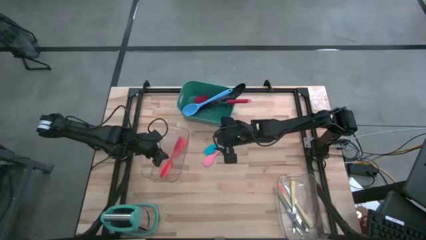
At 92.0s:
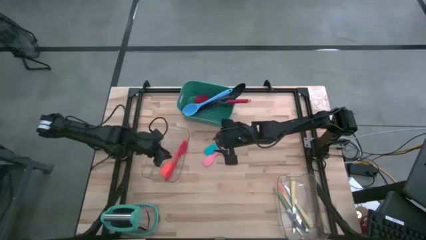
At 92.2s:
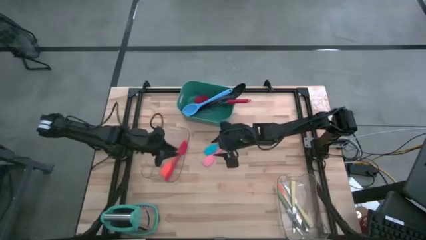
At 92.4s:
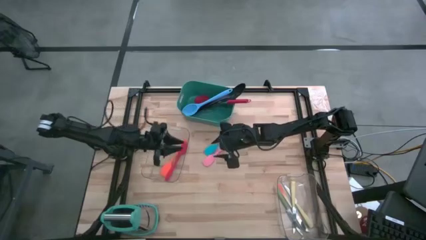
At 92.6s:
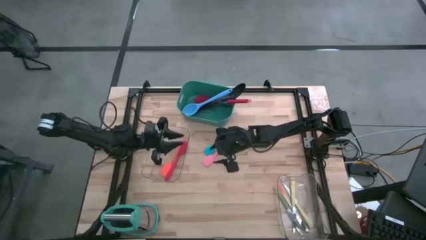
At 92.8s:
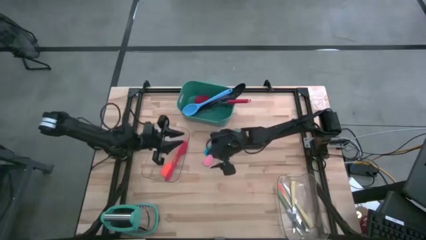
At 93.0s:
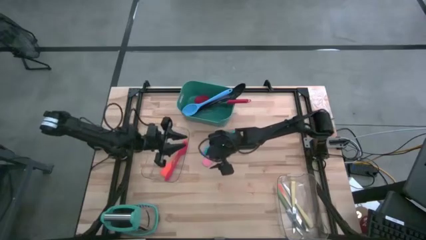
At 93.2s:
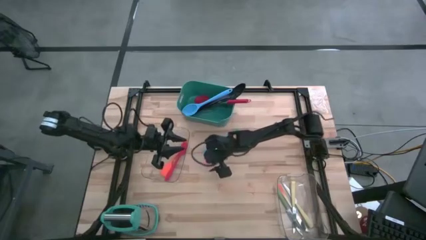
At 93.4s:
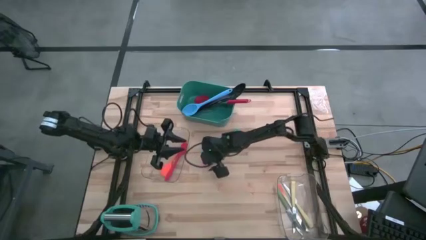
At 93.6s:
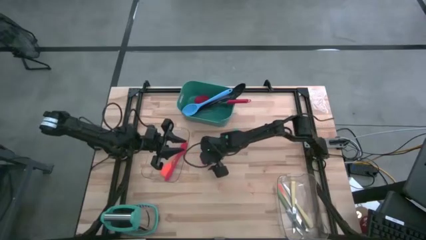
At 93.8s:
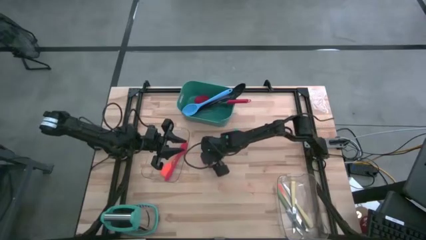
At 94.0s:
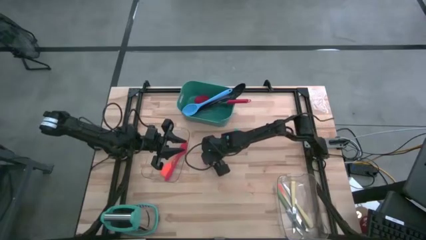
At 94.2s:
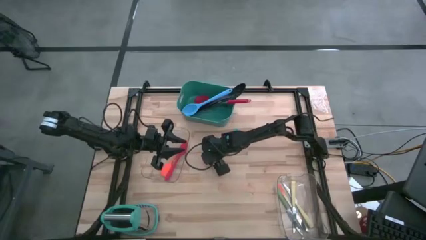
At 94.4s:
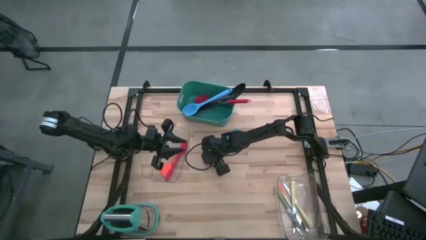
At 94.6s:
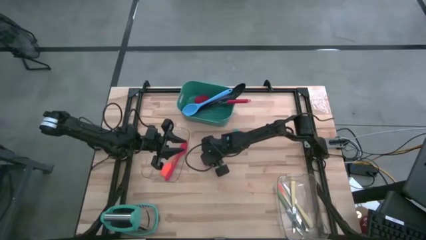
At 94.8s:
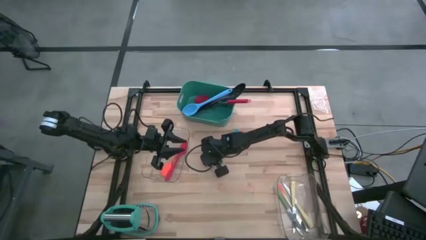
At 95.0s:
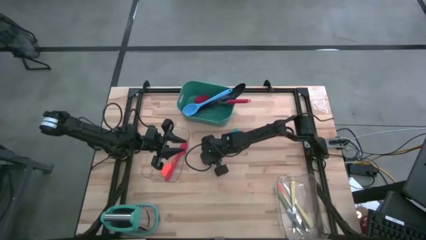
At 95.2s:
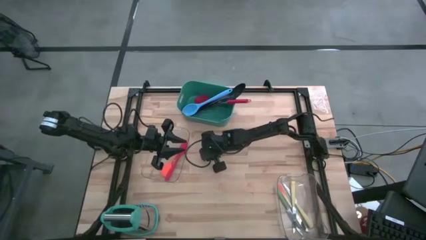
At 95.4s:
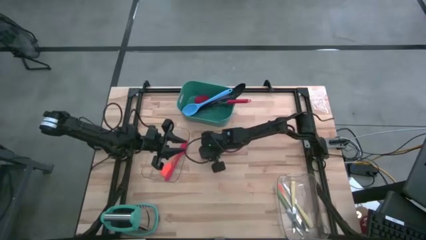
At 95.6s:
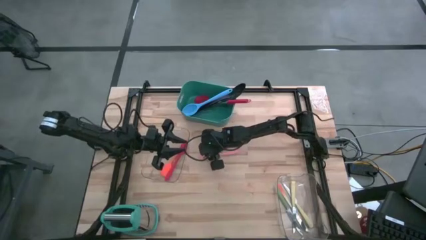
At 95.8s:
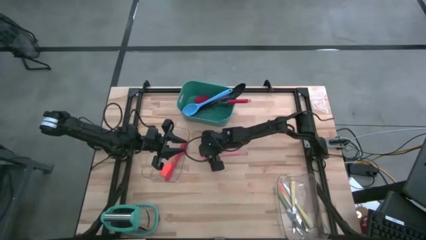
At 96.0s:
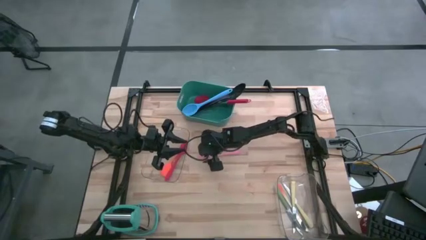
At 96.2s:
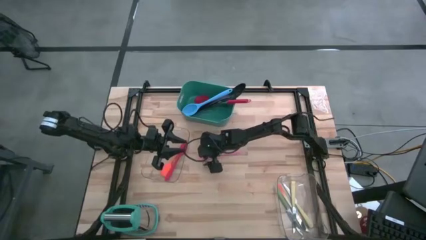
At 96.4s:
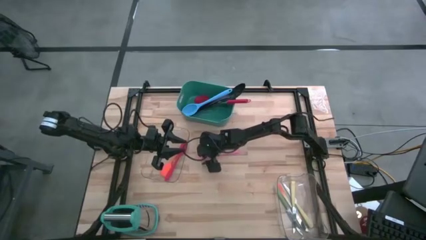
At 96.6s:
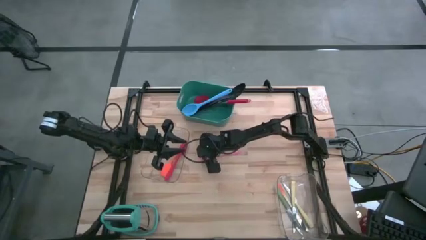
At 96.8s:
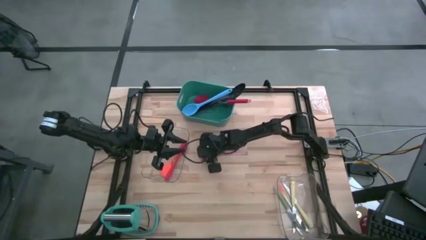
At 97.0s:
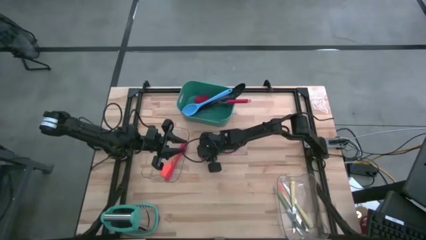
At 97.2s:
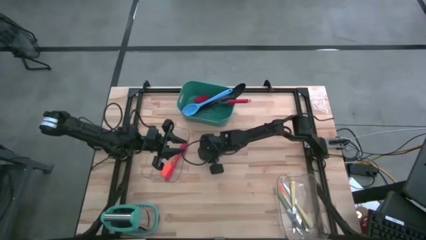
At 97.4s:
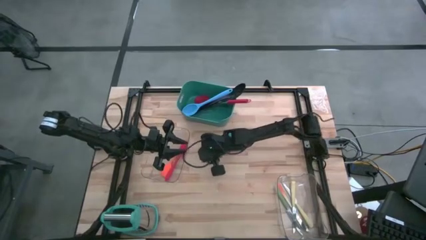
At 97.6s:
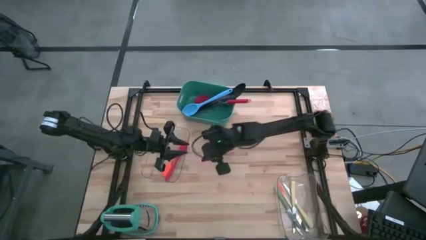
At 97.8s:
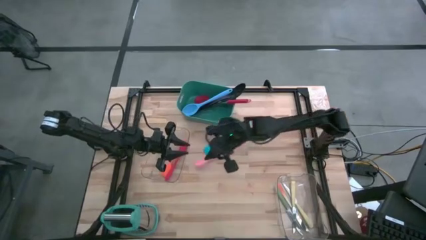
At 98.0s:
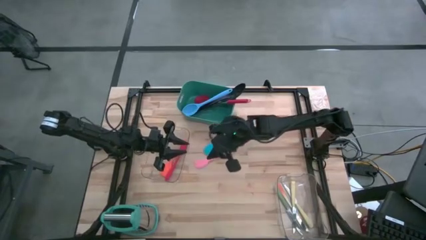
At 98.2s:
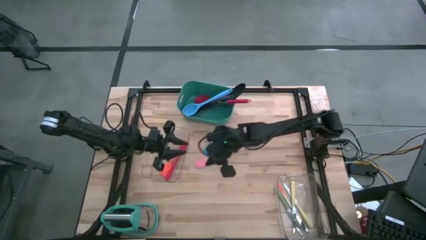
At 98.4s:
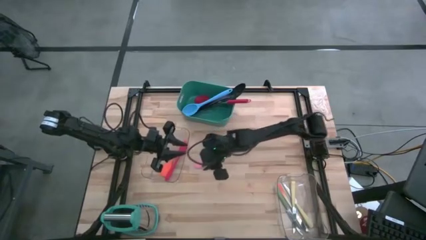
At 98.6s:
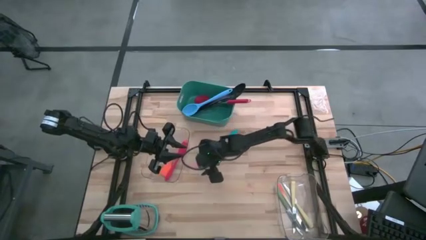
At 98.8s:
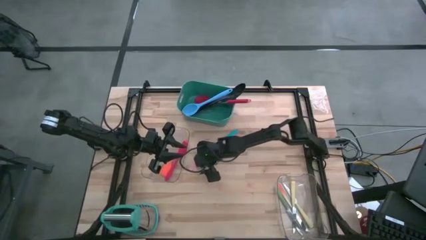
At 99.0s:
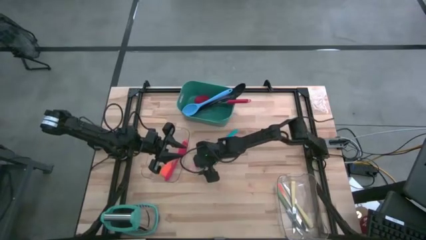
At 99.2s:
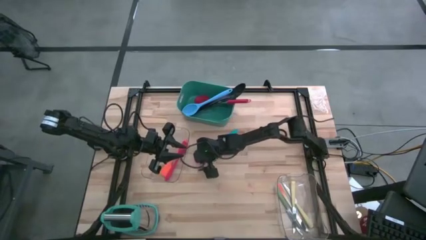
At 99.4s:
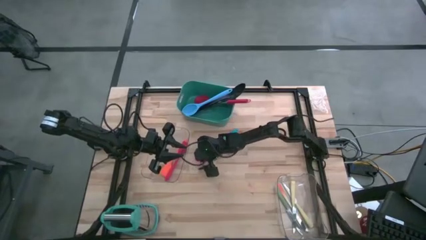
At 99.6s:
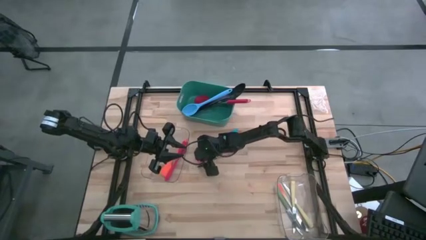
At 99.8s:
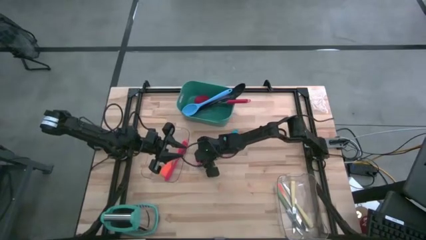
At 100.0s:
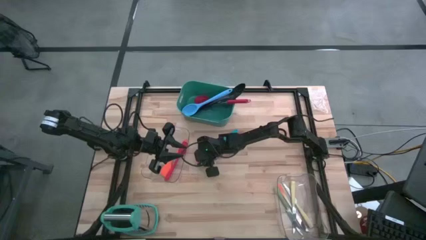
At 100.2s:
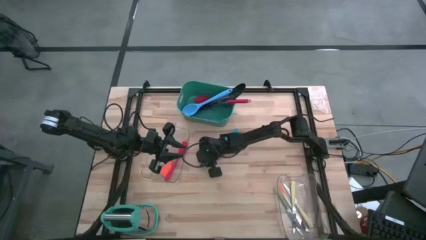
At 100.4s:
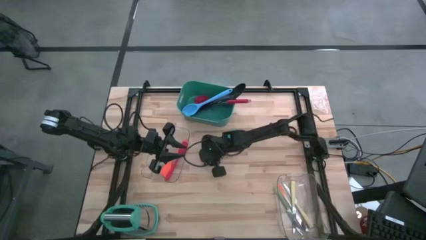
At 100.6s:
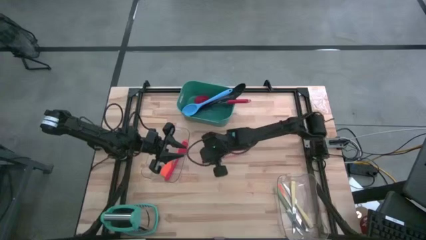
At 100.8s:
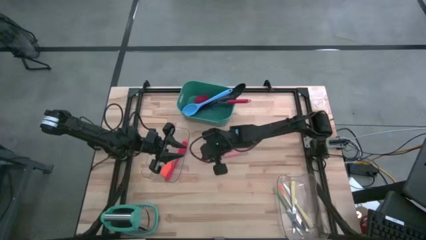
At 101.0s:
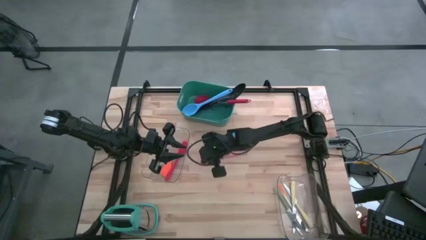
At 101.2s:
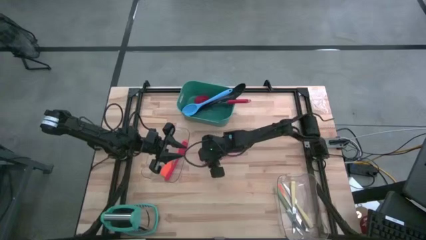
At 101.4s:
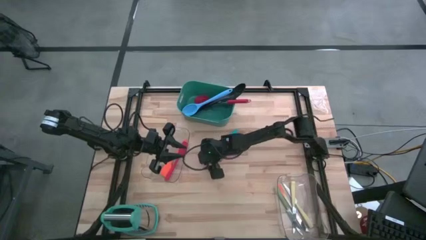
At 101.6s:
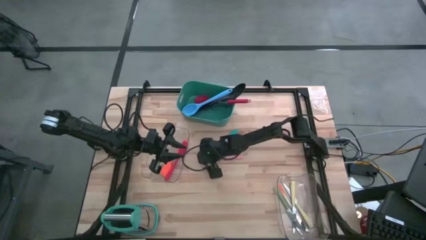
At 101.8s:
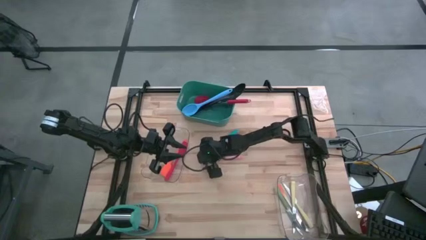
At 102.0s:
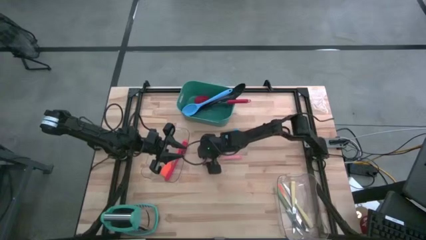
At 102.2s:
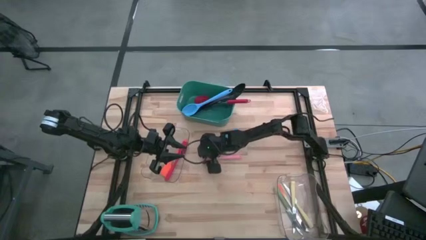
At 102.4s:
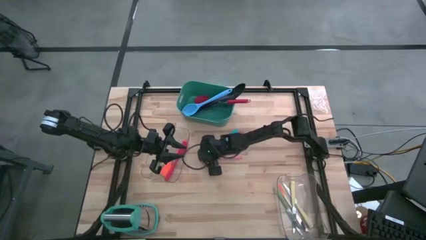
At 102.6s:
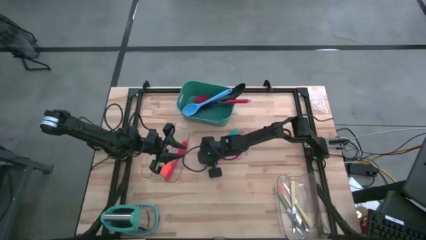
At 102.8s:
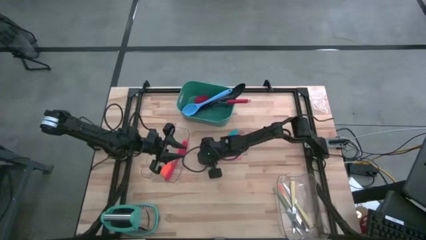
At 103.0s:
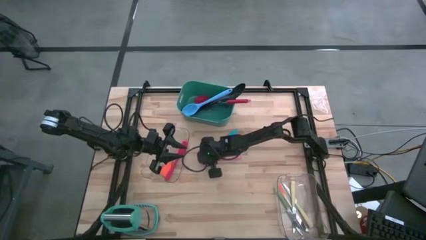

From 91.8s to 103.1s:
Task: Pick & Place Kitchen Items
Put the pink spatula into the left transparent bin

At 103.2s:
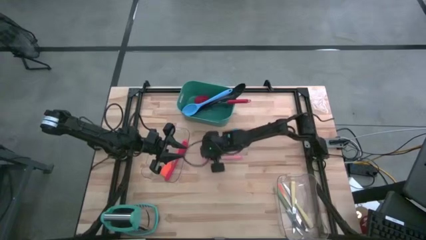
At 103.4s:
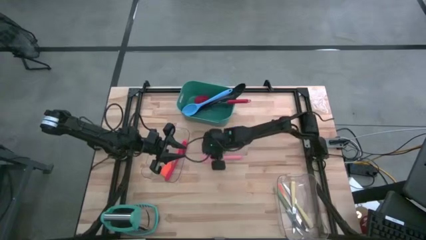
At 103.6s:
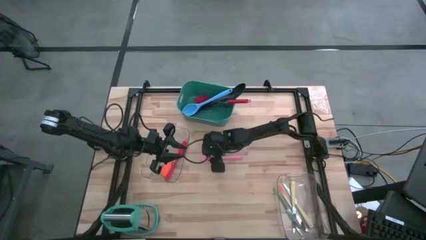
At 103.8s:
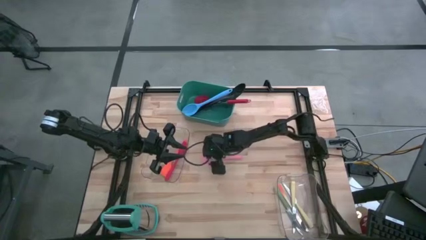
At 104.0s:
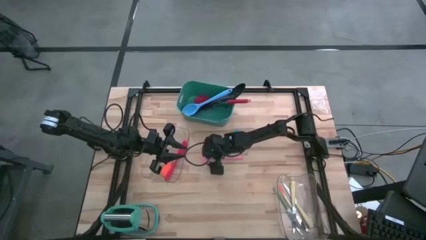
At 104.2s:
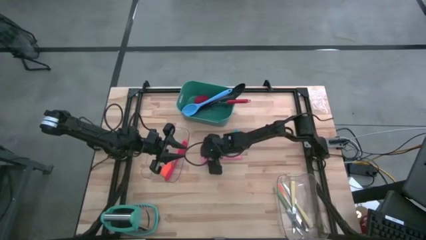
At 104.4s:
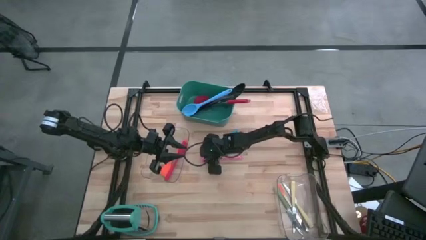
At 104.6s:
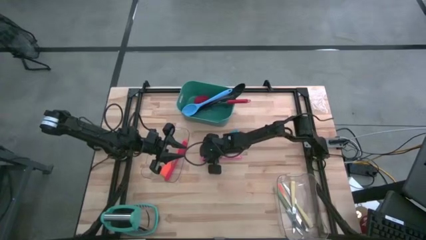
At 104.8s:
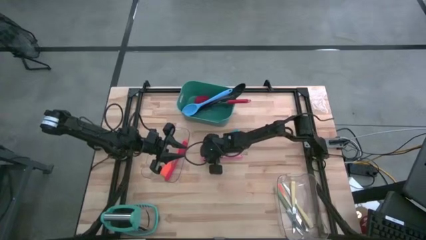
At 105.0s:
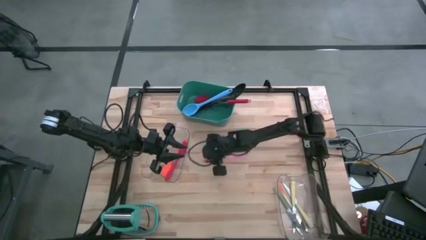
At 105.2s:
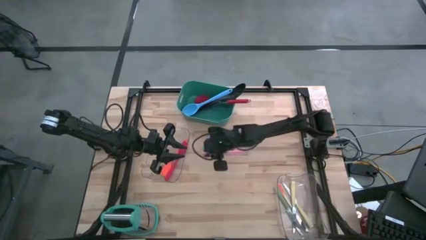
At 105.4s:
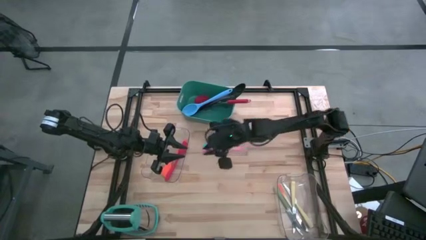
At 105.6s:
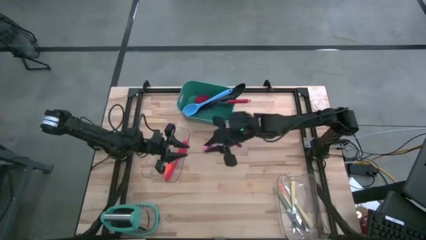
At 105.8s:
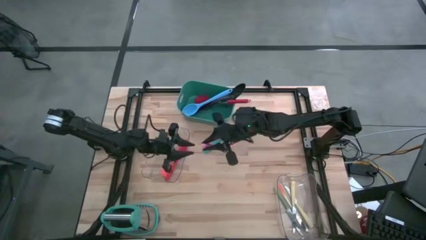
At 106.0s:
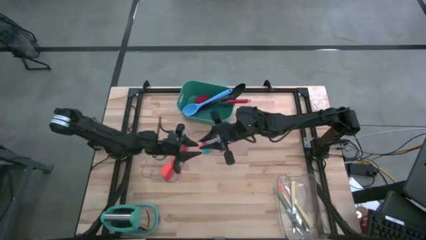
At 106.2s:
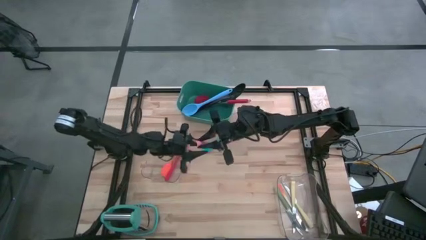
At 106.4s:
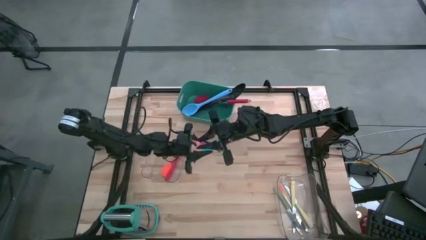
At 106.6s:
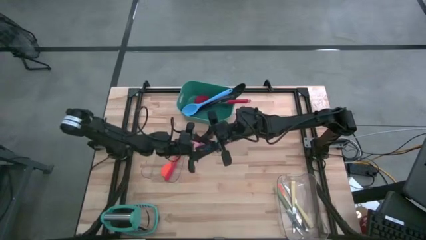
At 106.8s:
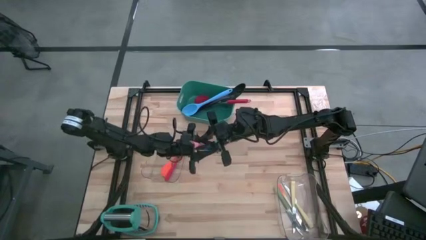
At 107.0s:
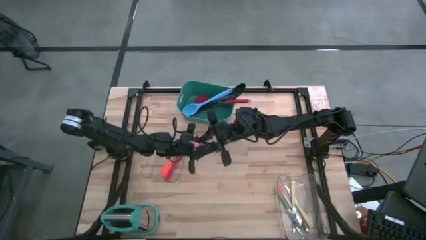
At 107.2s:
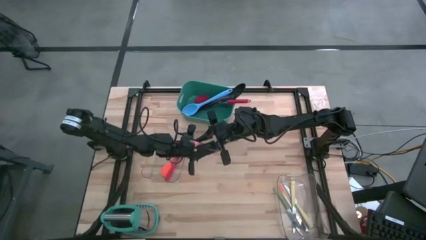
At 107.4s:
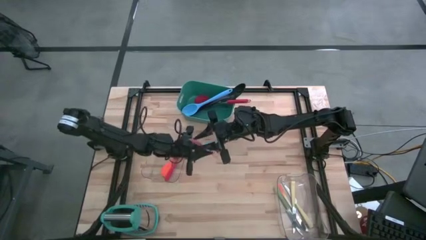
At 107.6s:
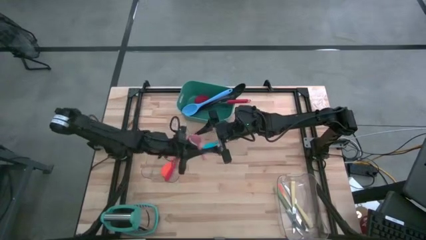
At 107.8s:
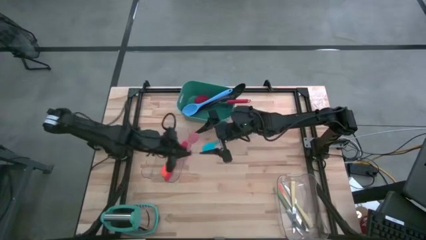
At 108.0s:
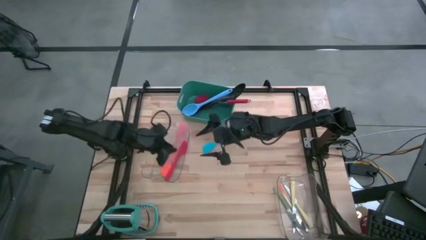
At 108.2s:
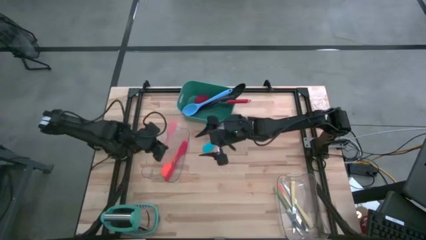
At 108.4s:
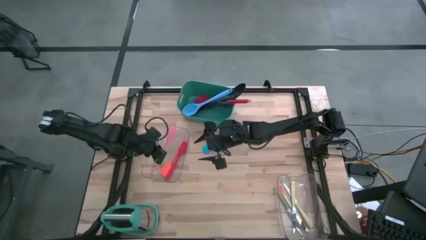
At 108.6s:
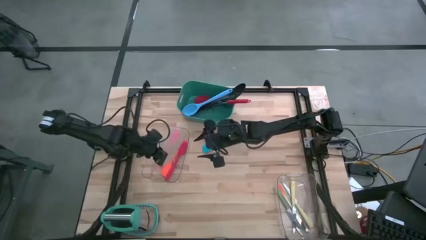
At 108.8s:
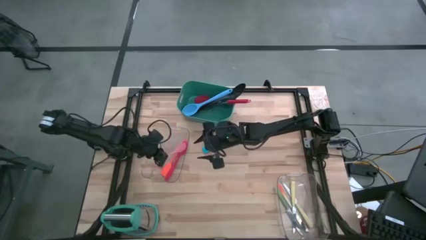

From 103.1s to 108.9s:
Put the pink spatula into the left transparent bin
